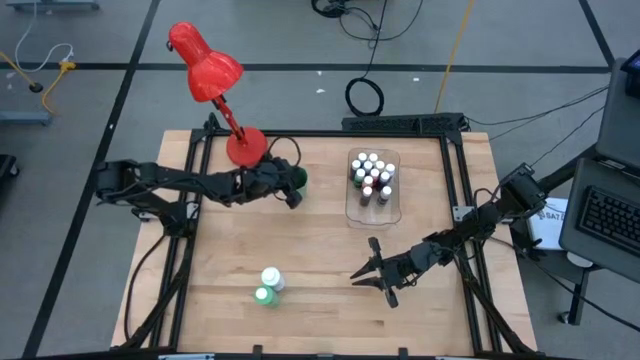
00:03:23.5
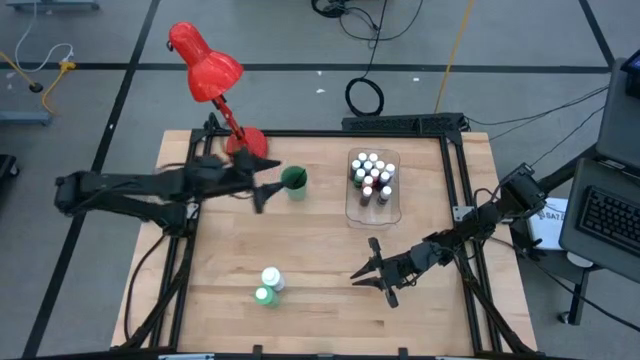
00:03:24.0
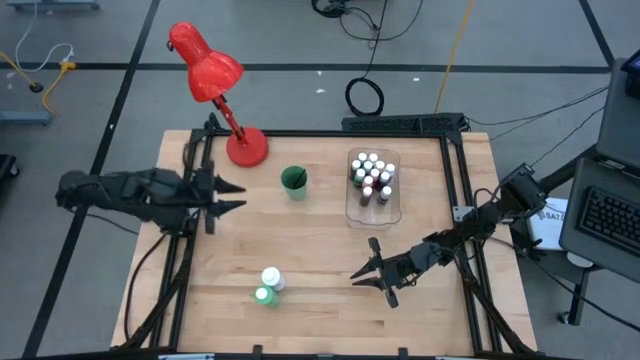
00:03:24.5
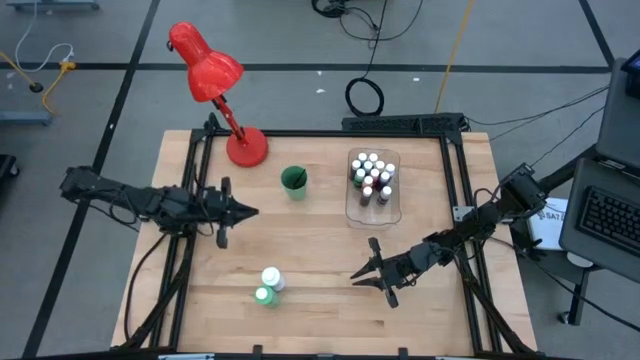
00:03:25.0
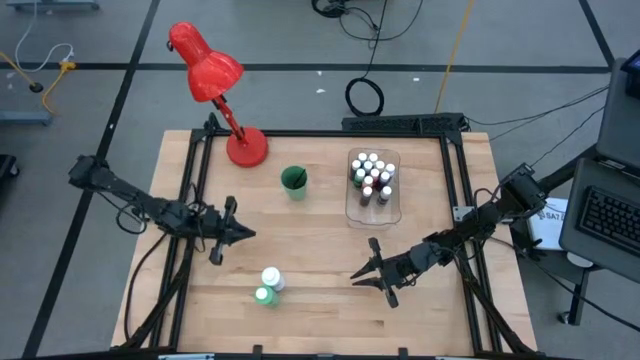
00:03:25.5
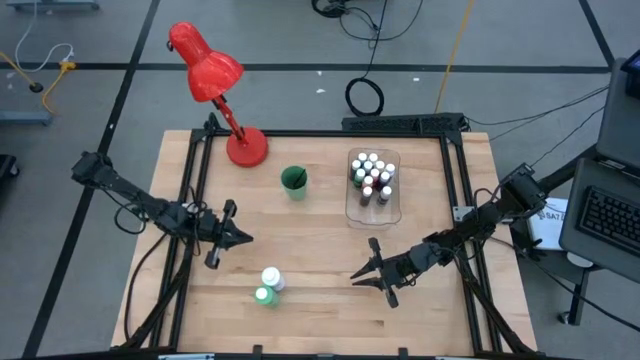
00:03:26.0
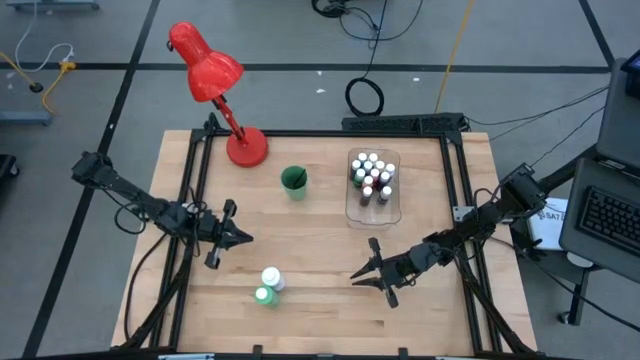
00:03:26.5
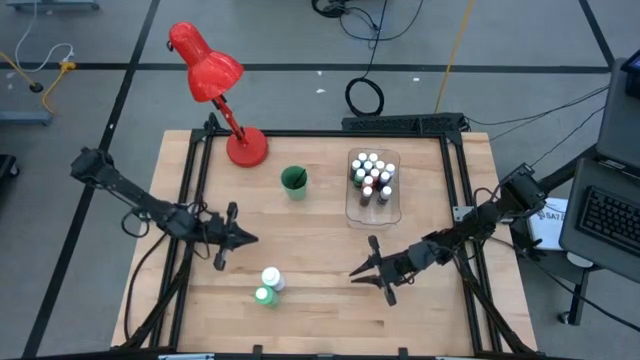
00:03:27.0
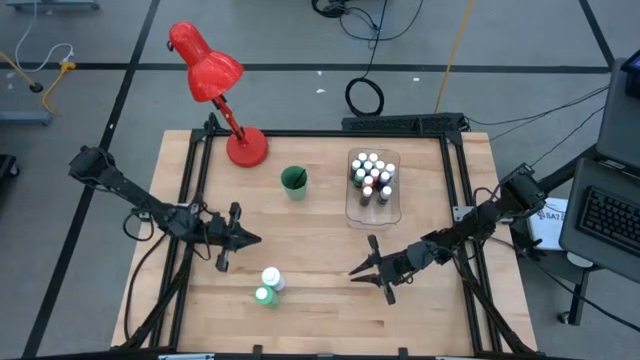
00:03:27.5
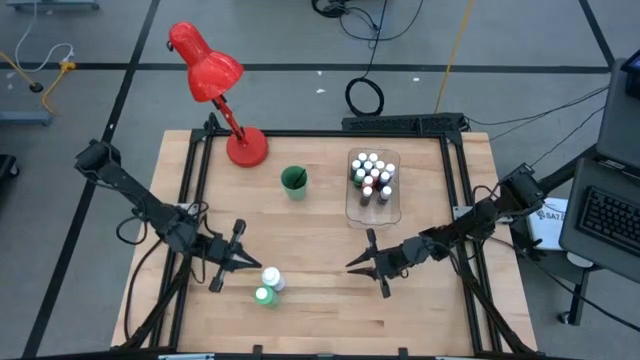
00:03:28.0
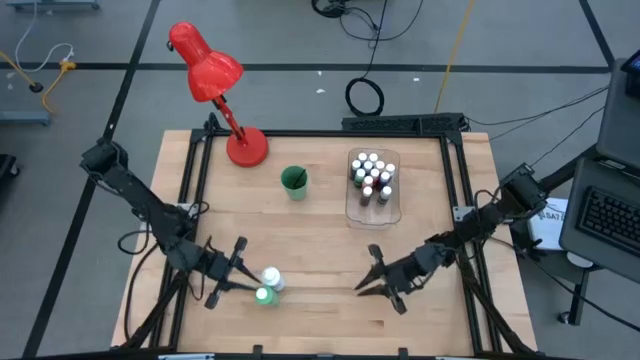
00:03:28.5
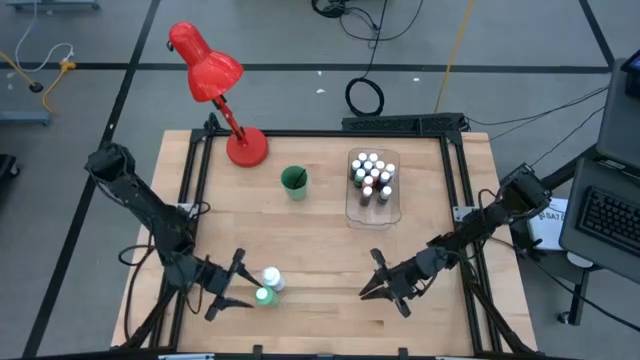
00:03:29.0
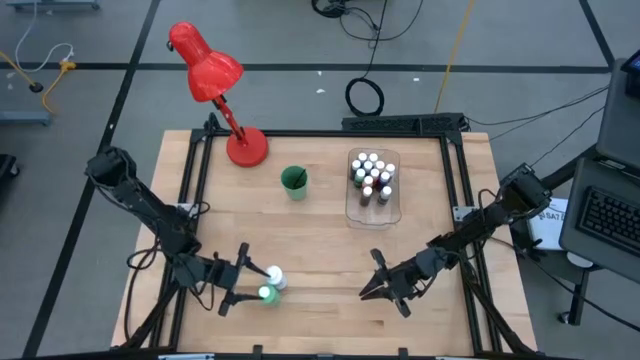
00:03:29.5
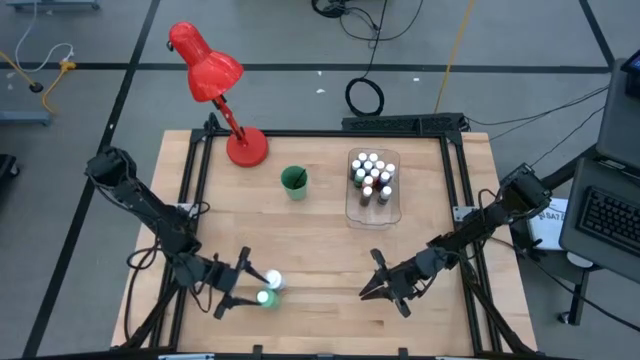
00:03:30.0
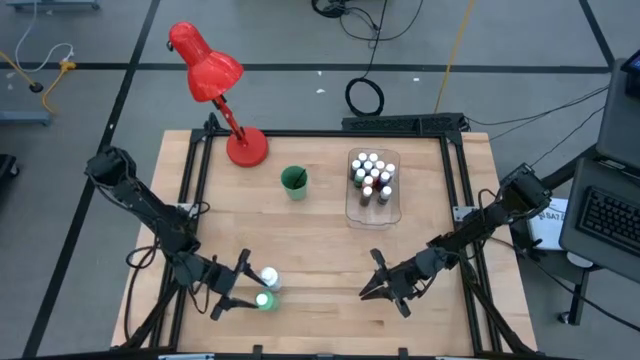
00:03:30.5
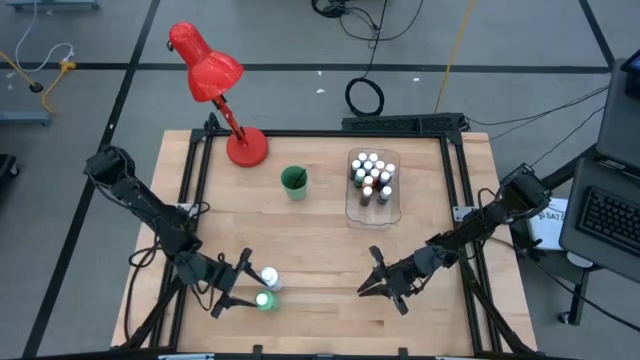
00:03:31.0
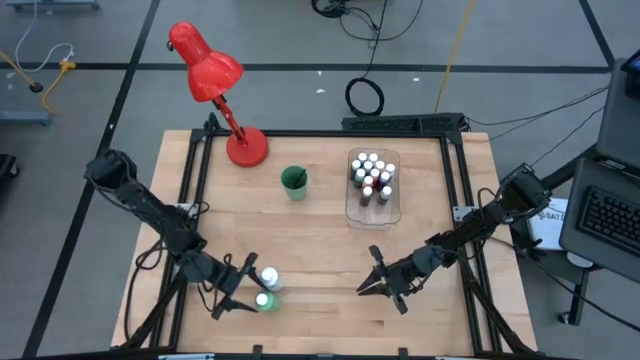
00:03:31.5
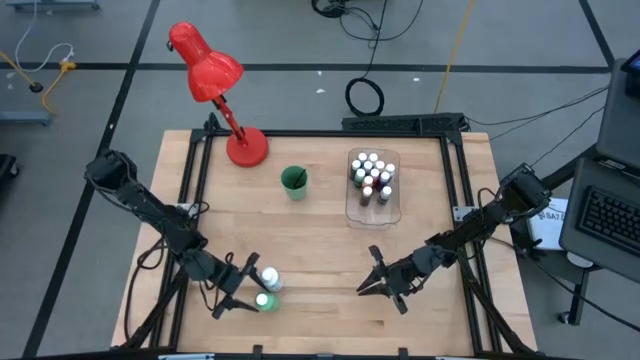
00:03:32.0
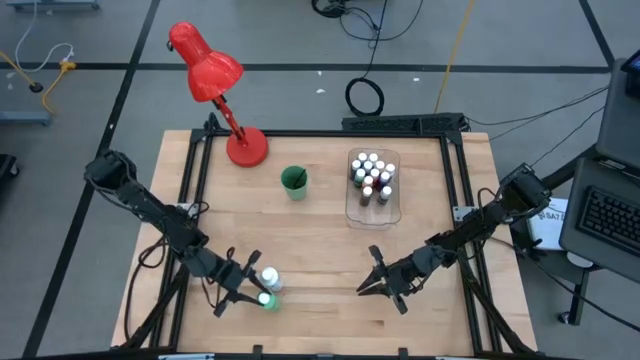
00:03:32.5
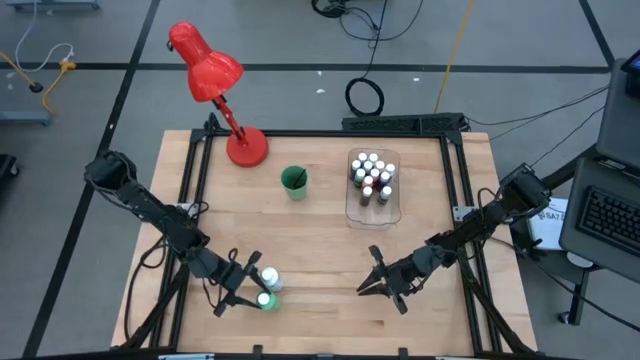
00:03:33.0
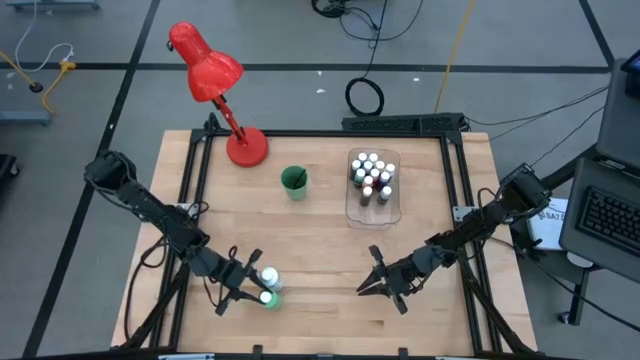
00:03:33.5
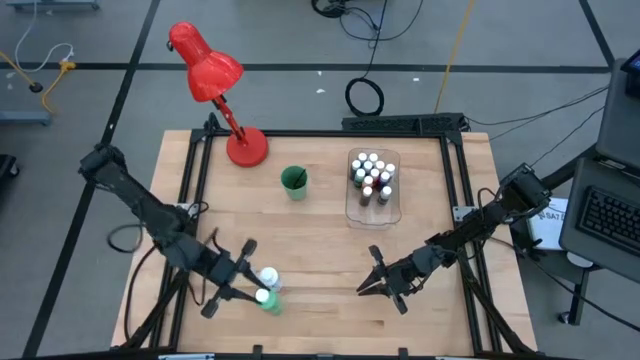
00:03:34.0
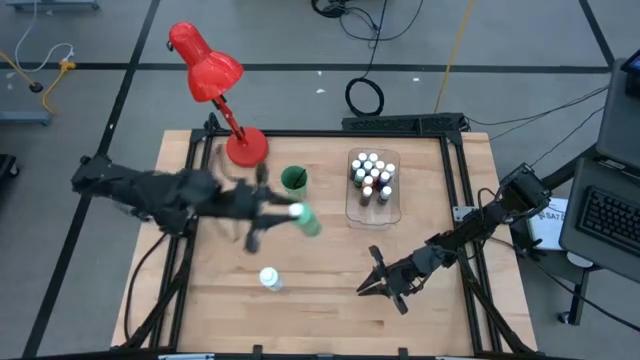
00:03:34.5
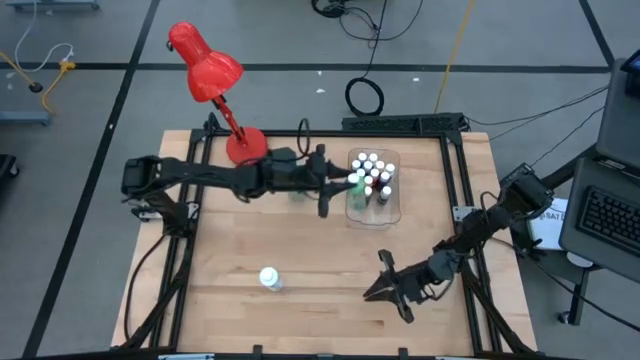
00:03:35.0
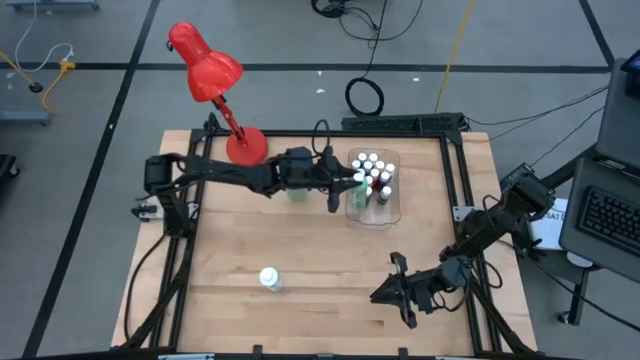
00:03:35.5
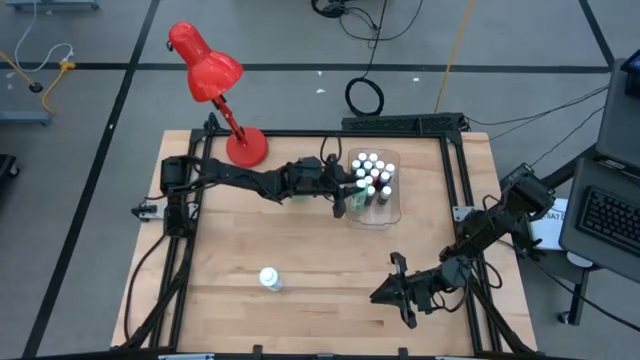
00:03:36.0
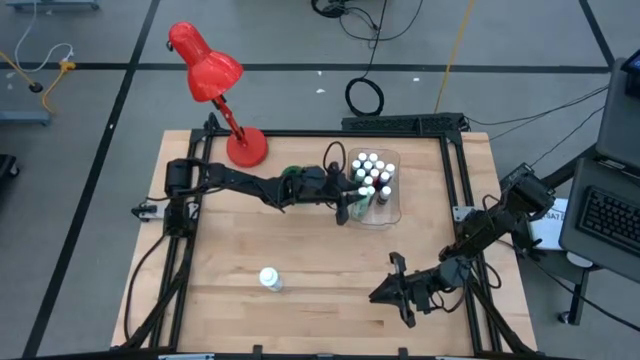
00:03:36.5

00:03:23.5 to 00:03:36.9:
Task: Pick & Place Paint Supplies
Put the green paint bottle into the transparent bin

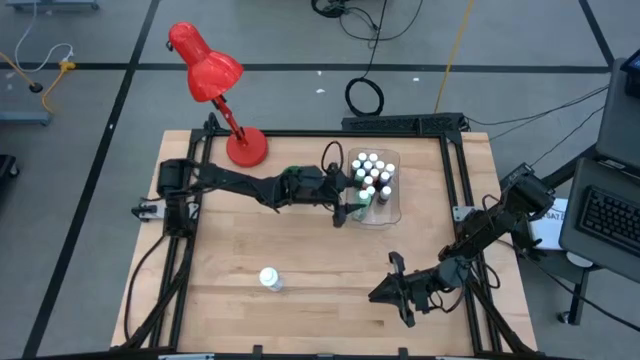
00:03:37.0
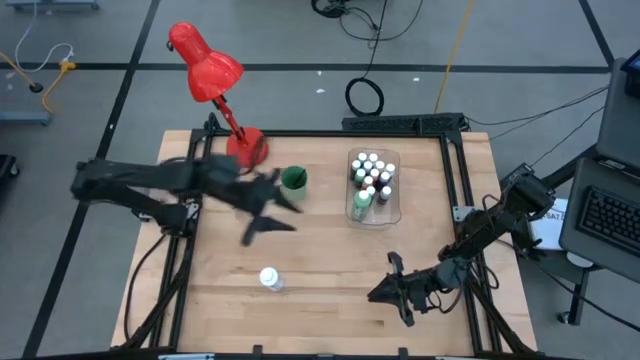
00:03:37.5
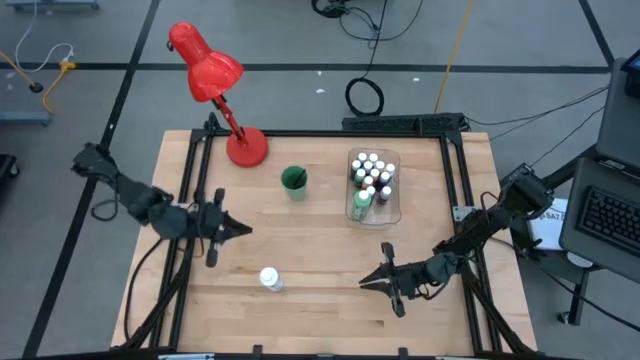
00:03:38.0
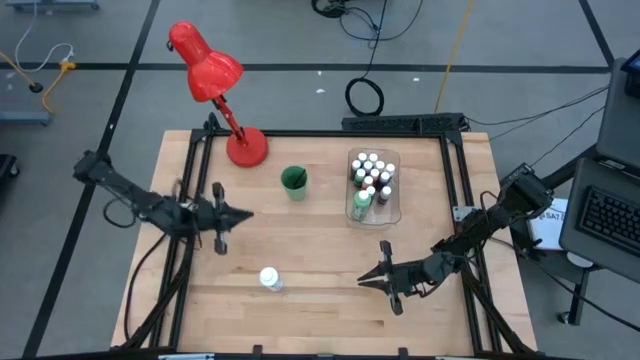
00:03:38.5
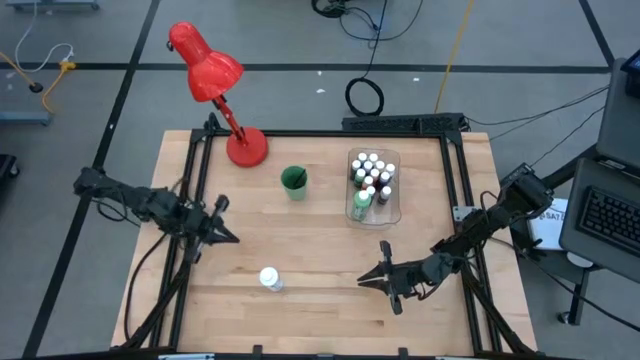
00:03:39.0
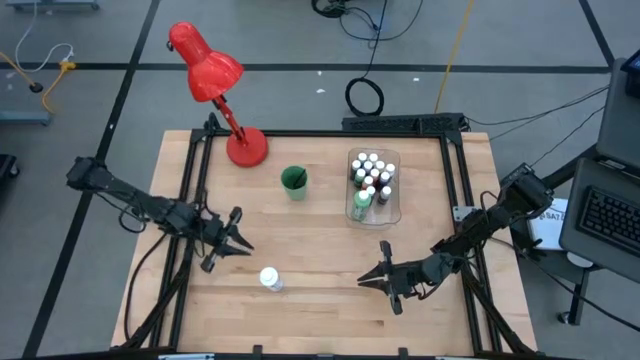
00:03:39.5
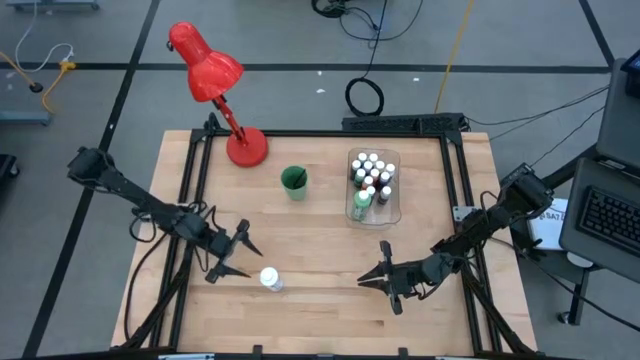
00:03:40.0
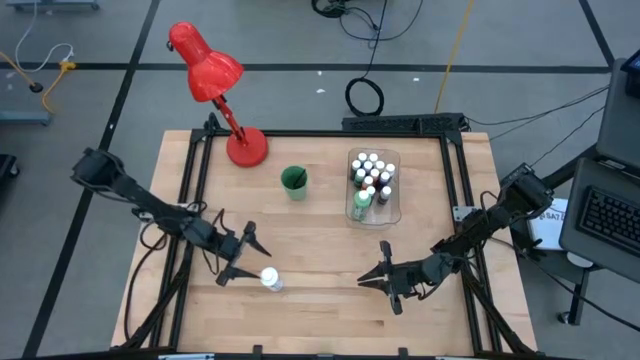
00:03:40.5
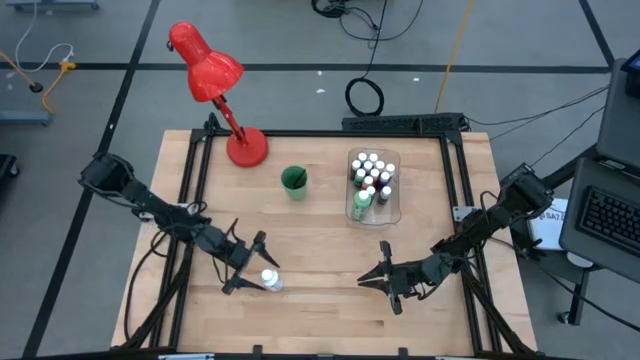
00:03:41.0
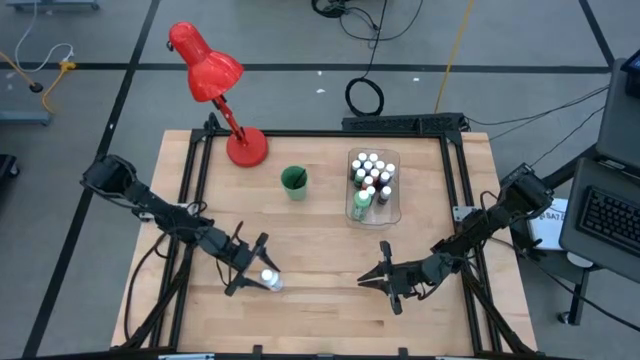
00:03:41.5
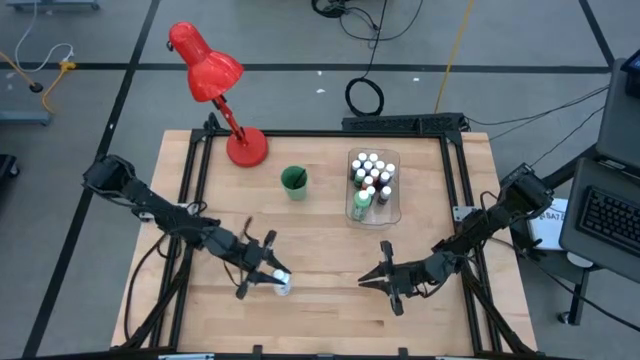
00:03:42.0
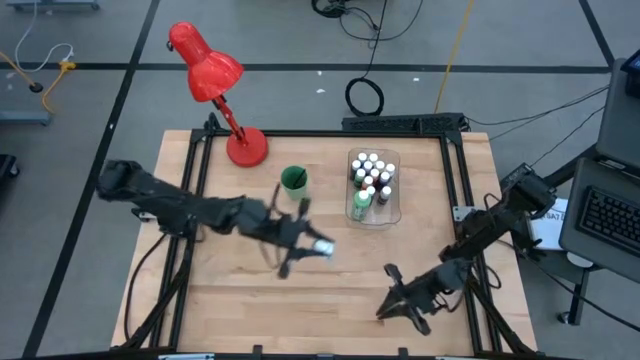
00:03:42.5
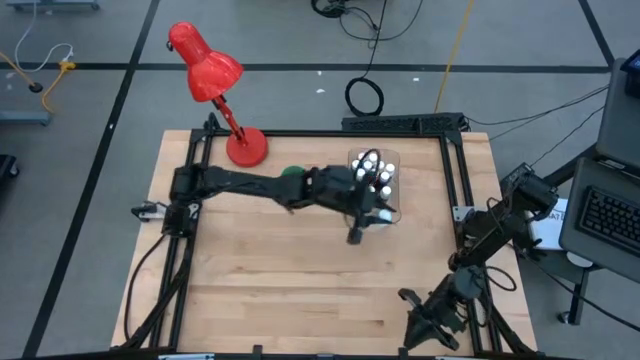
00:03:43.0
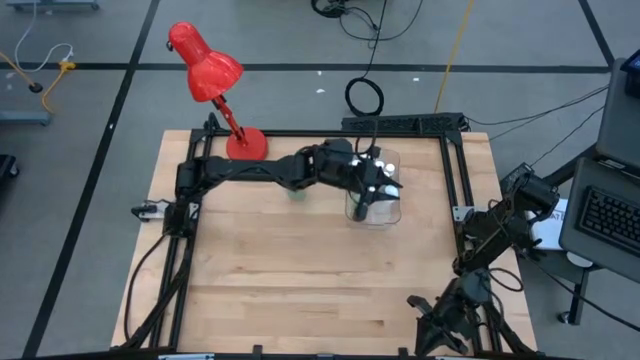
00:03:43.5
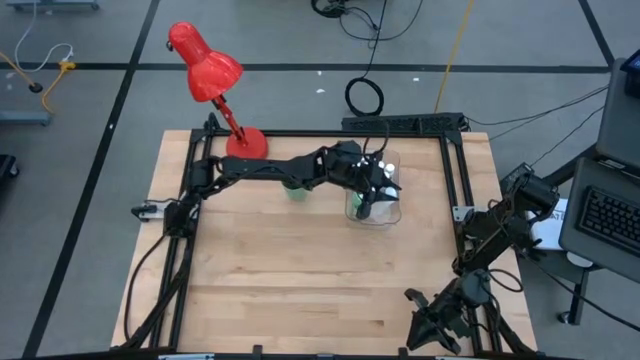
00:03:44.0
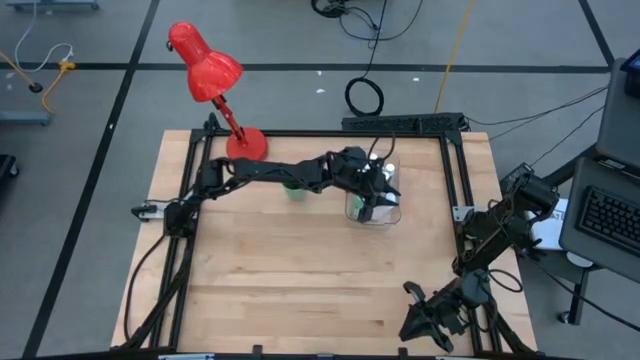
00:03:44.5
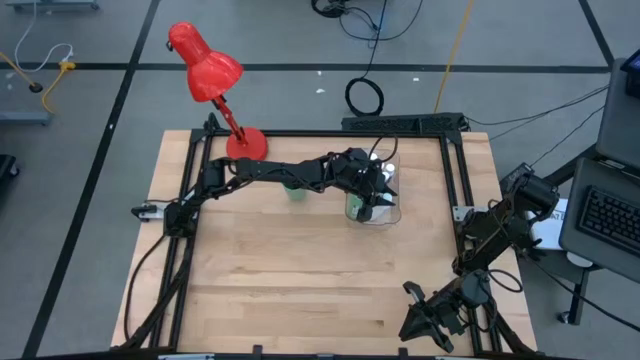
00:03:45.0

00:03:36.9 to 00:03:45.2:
Put the white paint bottle into the transparent bin
